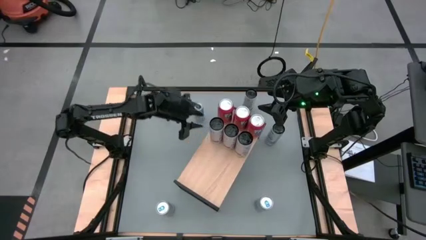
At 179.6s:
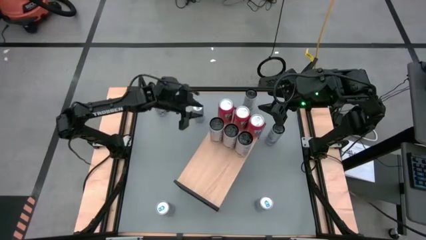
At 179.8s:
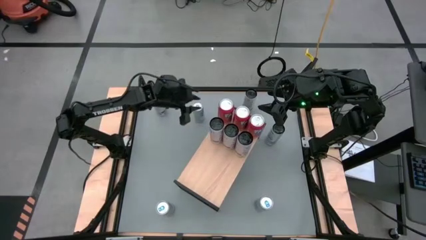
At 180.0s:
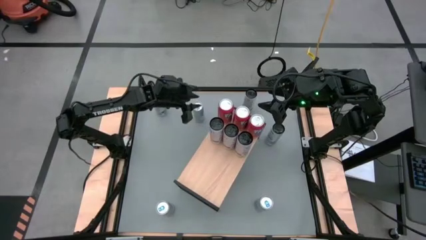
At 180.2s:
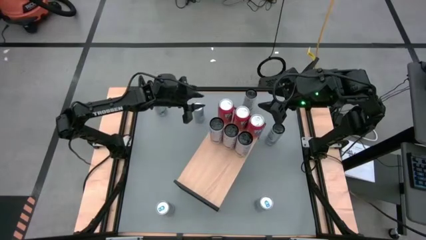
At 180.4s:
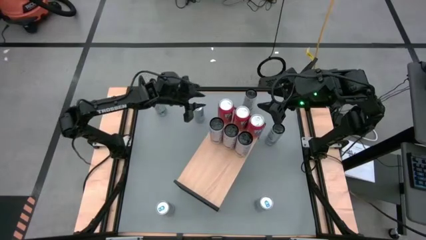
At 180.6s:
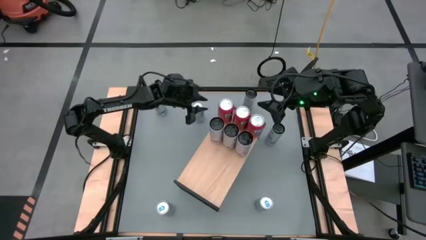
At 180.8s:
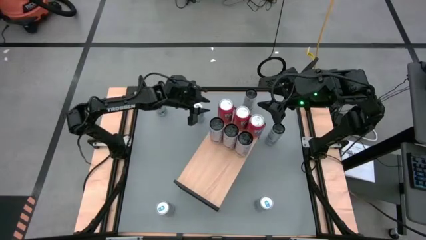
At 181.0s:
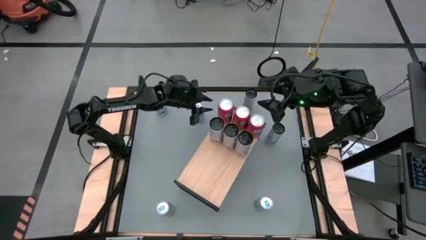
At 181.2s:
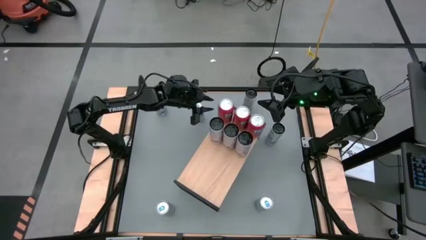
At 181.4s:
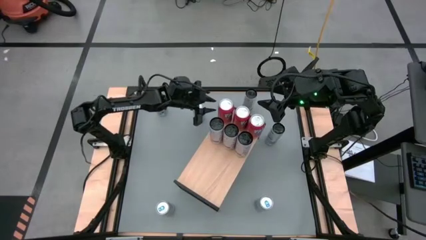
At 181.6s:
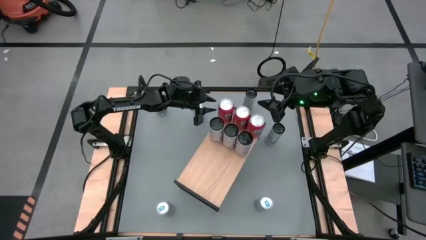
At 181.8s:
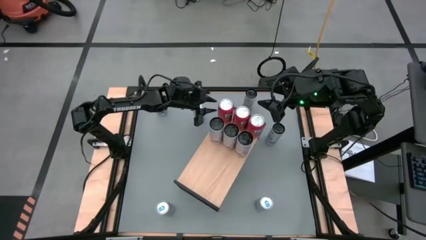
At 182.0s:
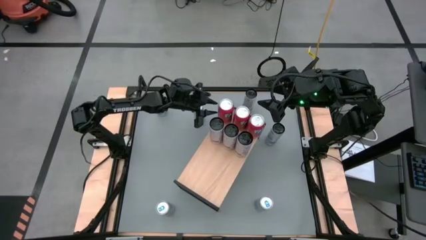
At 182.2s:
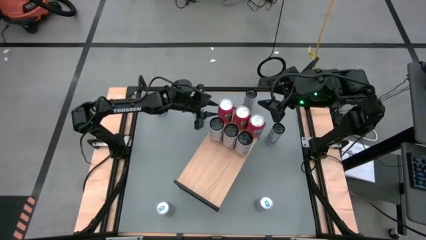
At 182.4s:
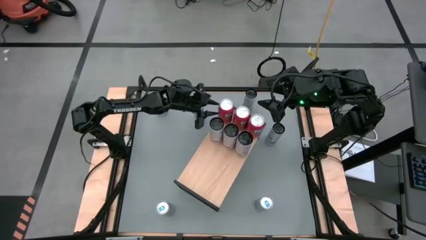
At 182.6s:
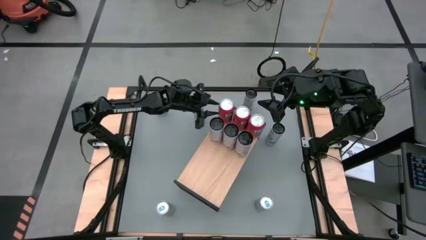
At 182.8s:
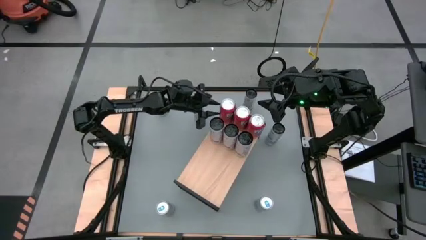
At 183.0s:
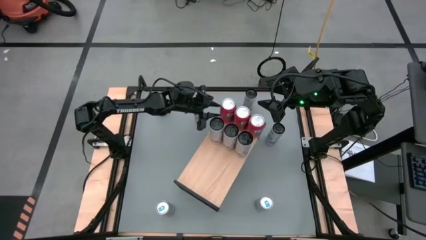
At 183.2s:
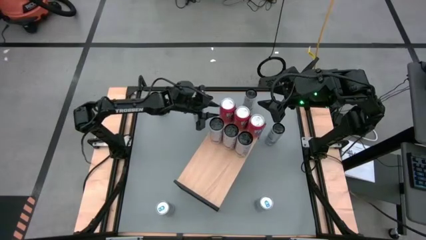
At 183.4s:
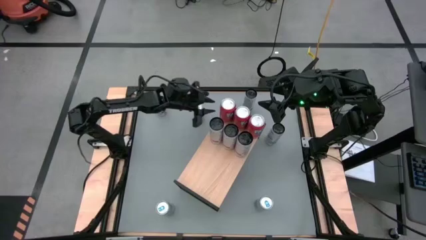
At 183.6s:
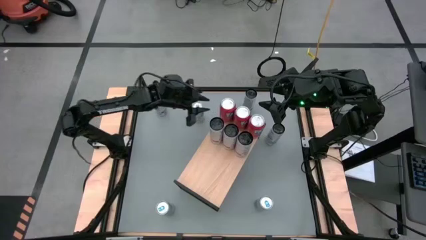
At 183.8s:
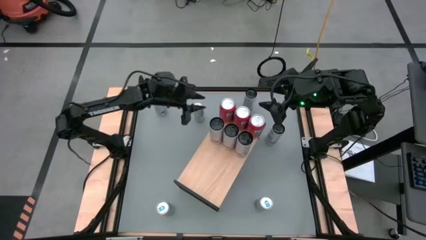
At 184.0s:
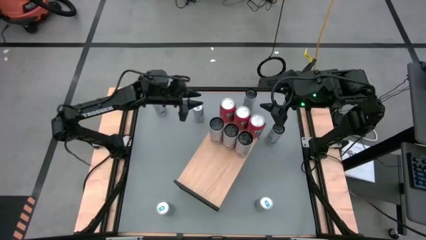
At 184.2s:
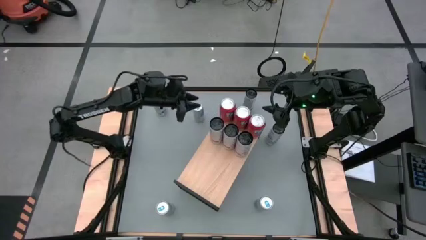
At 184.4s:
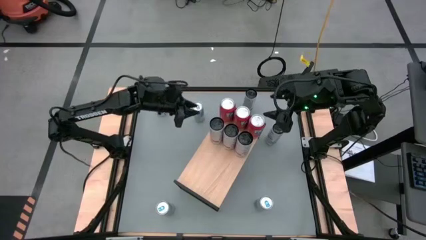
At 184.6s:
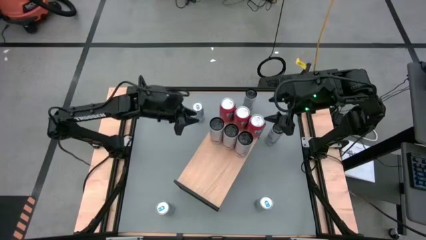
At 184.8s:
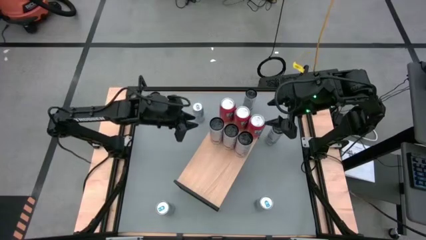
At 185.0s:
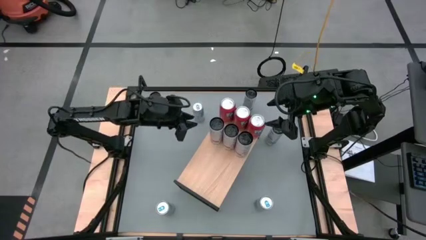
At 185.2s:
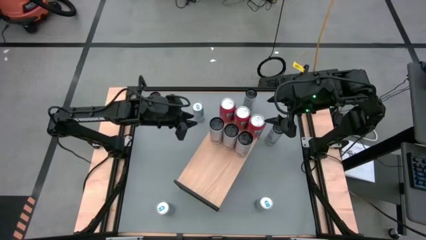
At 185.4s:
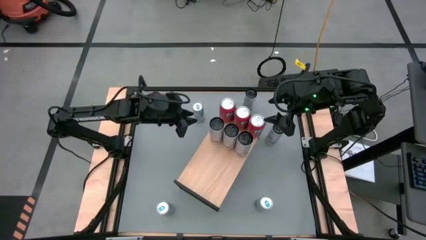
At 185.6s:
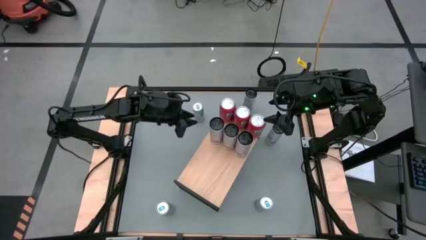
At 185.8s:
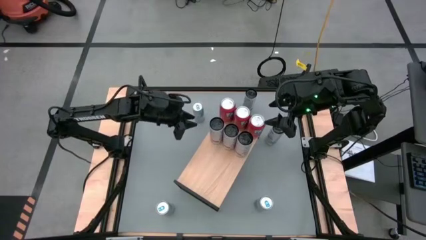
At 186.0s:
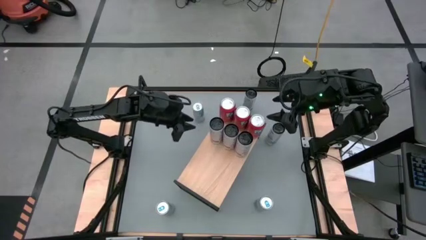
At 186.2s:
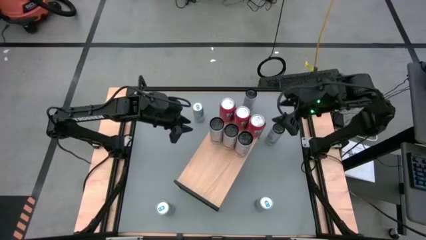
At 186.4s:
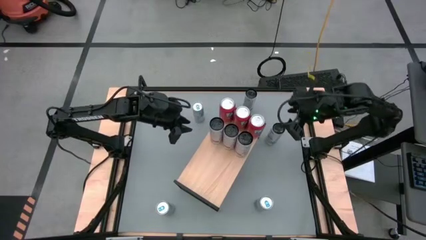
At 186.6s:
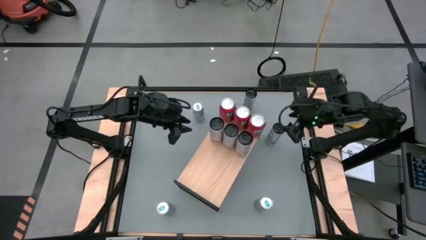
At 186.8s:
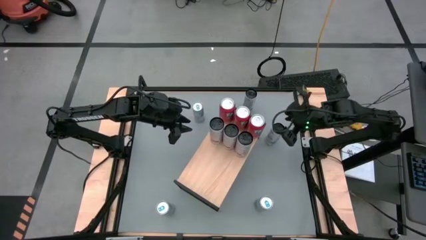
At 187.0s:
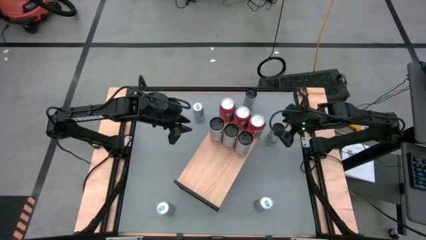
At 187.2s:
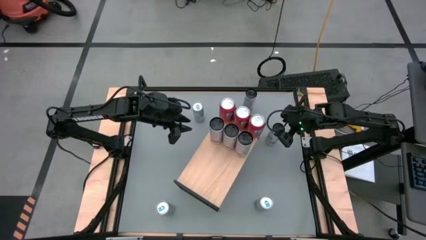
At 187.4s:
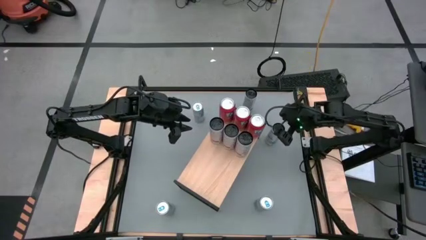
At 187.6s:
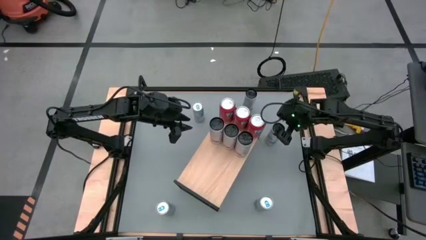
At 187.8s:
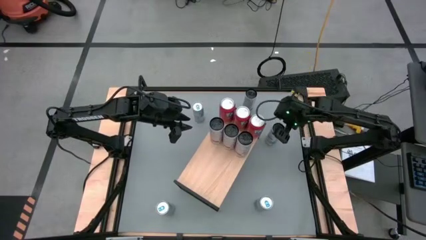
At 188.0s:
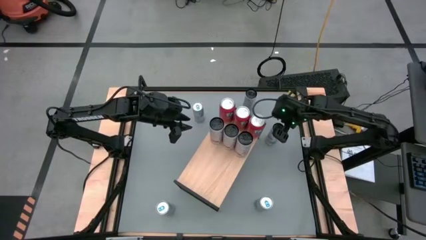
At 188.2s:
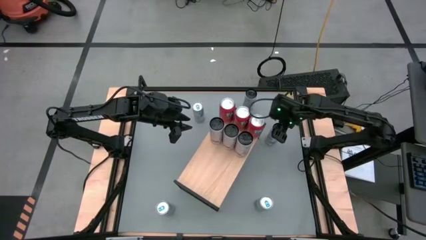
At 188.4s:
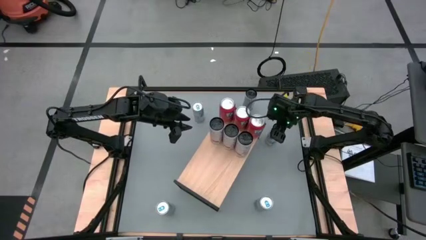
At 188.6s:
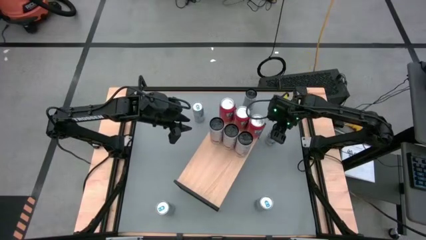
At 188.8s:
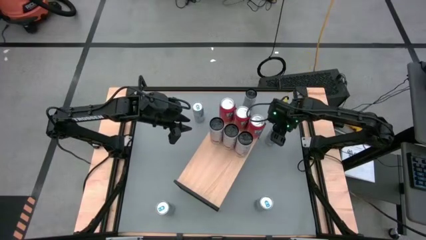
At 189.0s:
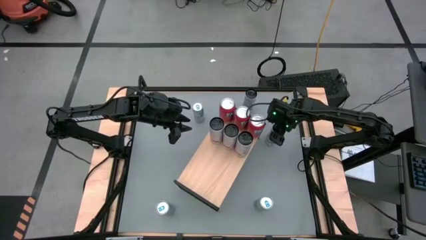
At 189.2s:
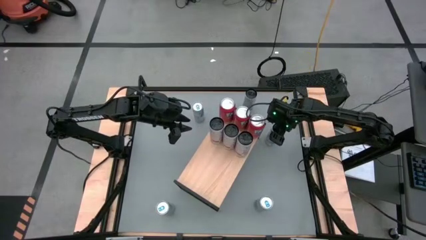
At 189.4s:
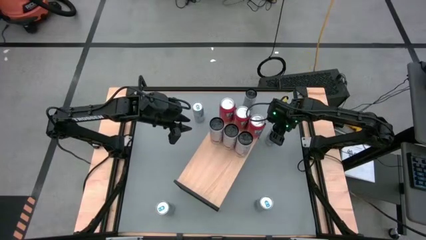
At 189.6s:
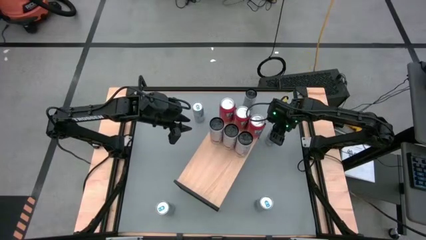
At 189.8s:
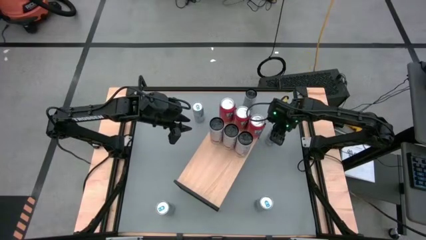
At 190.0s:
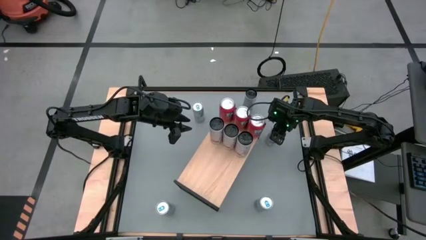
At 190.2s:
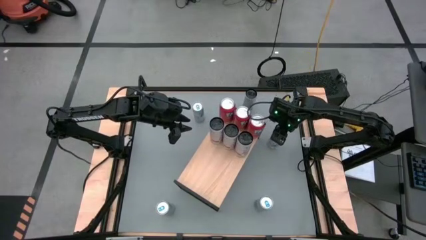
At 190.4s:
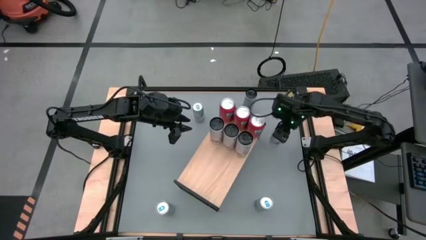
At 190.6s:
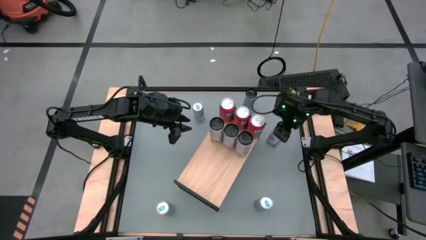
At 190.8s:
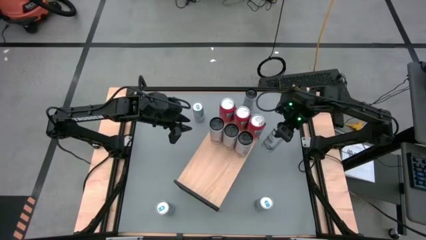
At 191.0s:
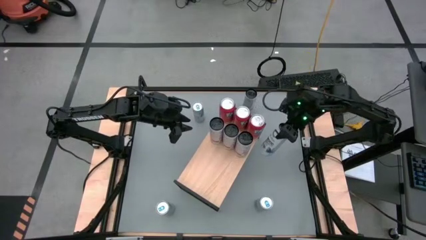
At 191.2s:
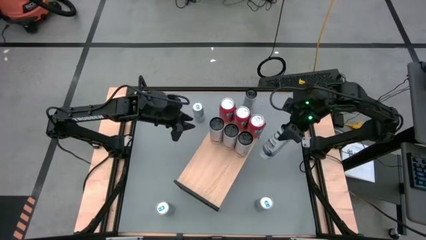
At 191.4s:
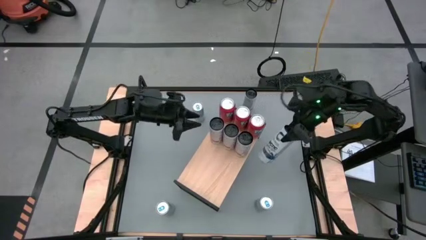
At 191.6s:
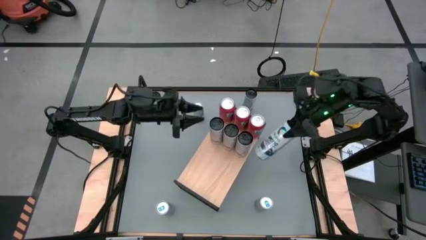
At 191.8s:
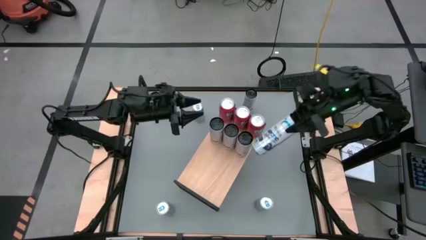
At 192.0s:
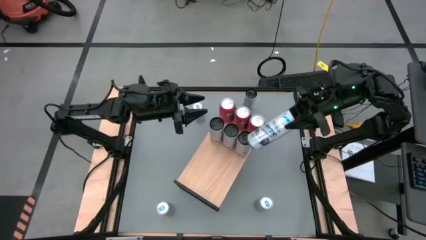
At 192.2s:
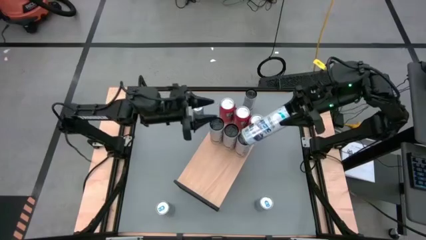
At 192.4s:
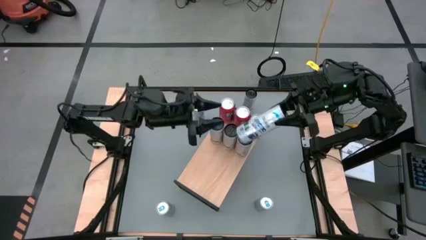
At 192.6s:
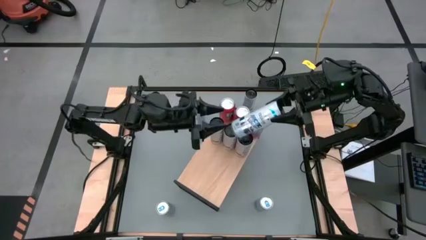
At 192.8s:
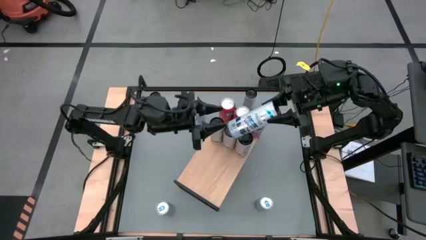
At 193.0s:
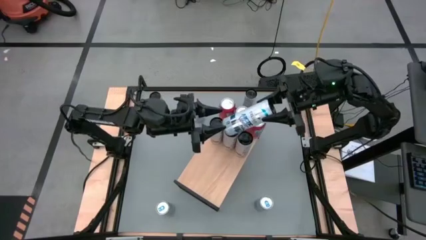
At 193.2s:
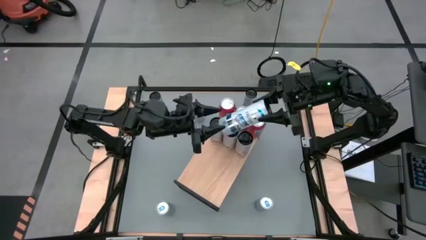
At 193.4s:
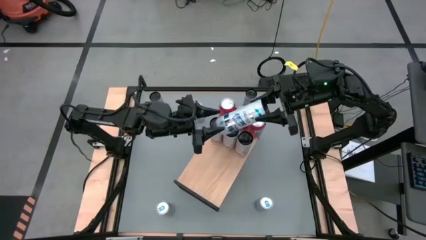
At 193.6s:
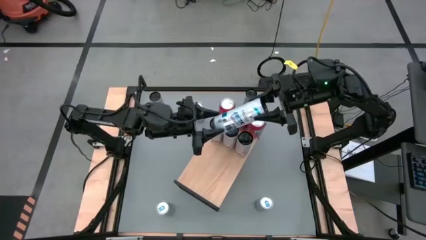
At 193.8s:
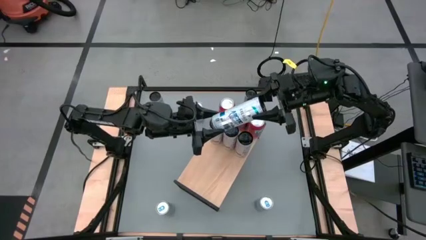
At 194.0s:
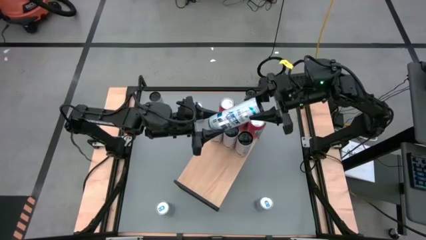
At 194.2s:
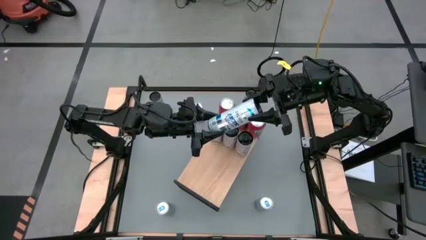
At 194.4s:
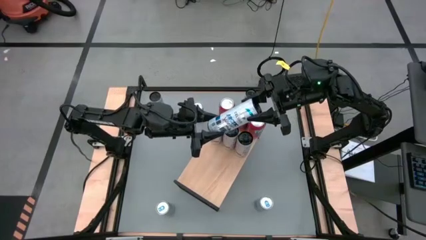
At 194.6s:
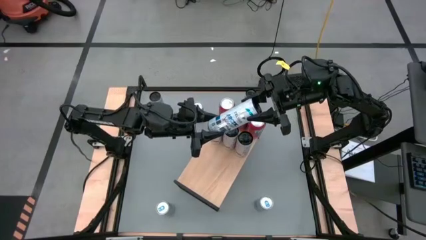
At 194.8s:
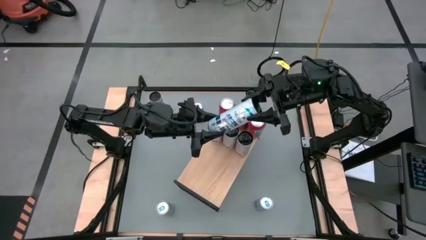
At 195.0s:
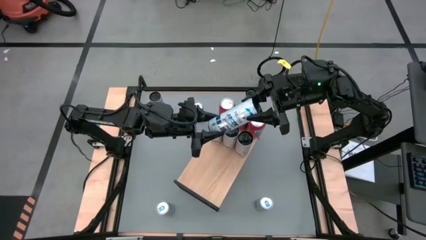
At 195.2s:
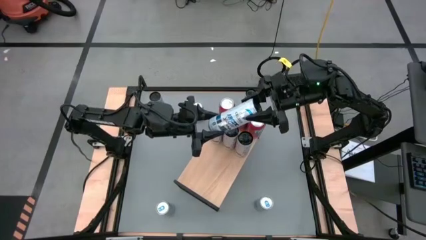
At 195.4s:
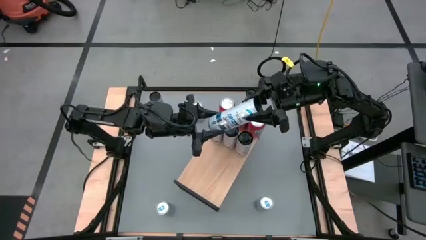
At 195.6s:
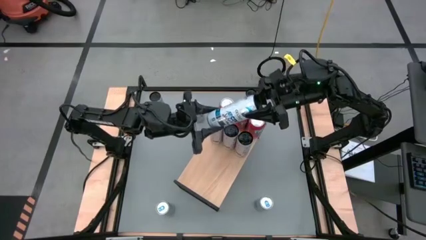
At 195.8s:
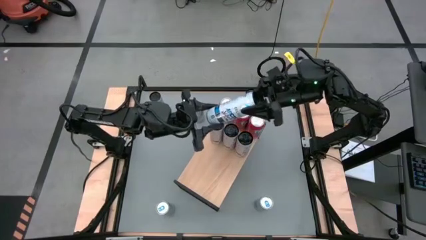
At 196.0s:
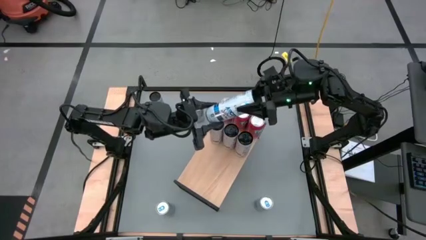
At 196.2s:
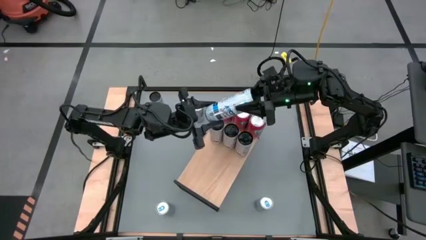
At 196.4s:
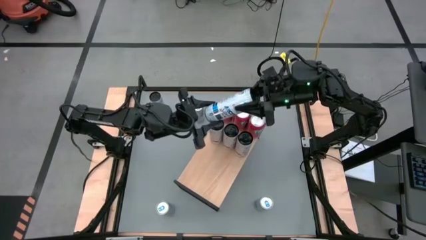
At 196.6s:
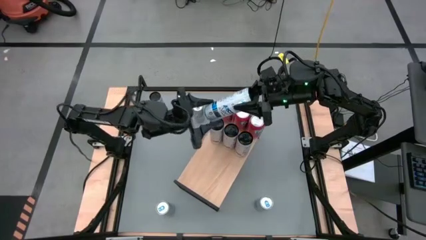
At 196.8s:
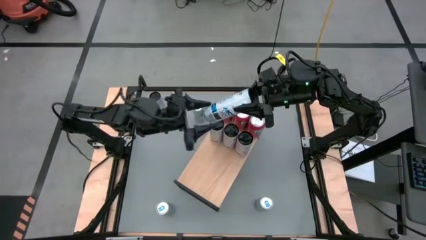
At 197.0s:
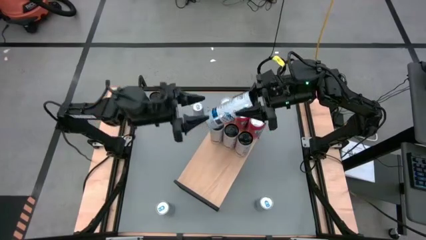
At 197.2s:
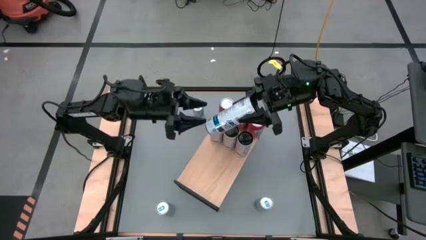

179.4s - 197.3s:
Task: Place canned beverage on shelf
Put the white blue soda can on the shelf
